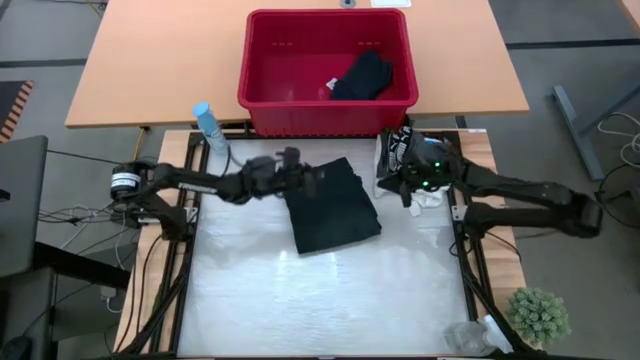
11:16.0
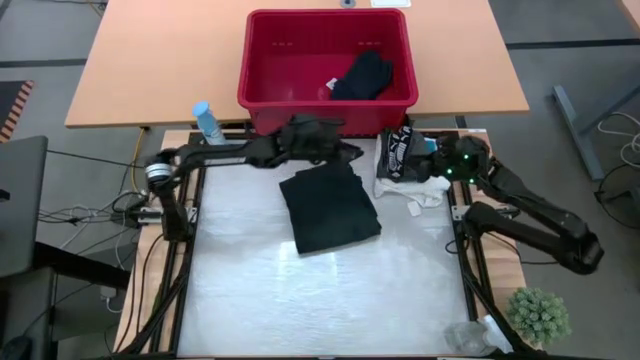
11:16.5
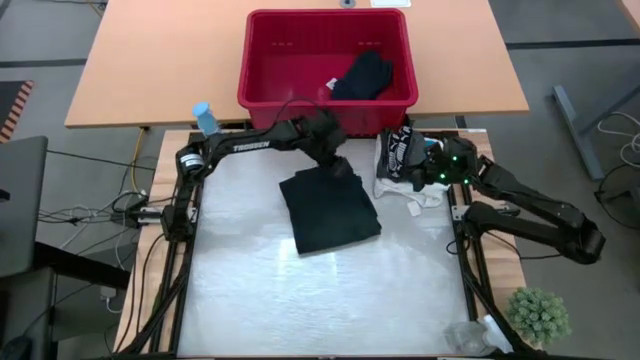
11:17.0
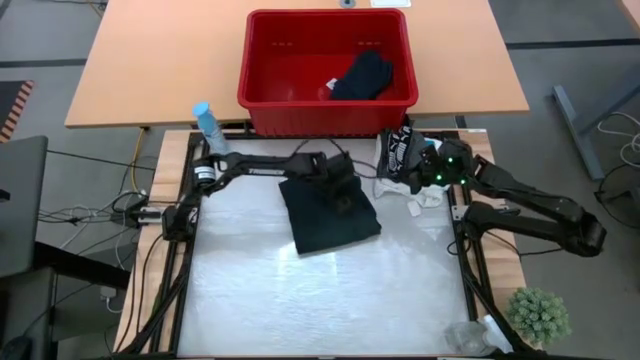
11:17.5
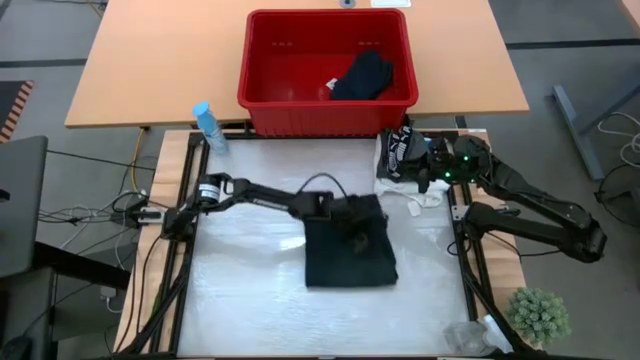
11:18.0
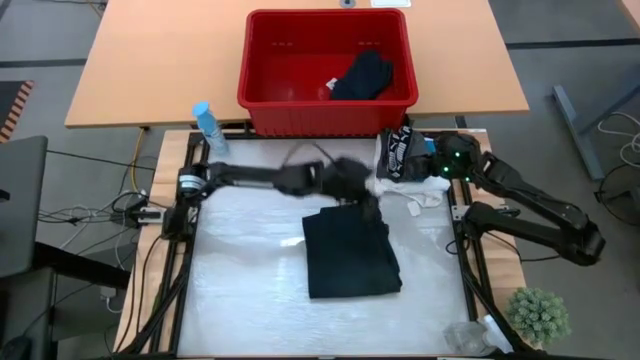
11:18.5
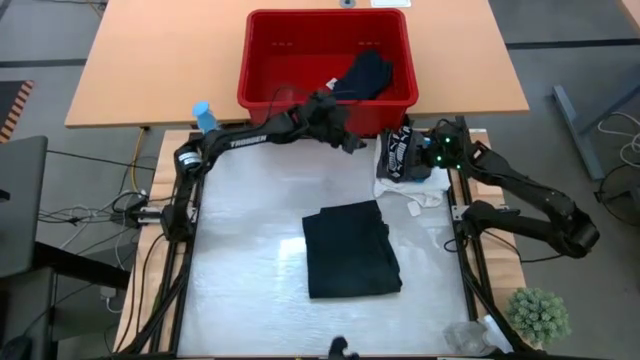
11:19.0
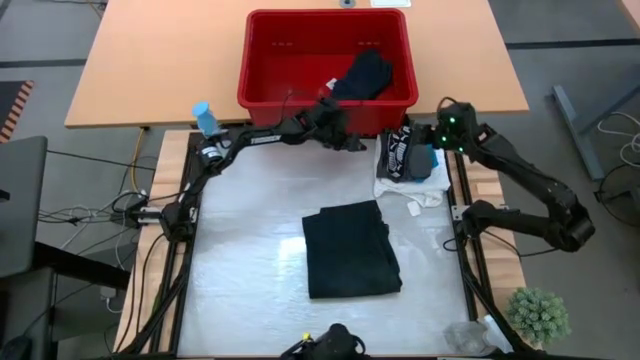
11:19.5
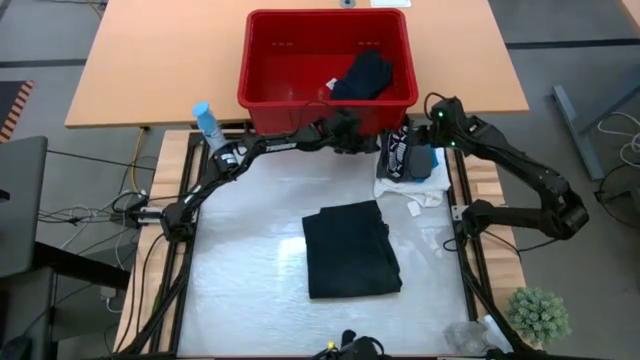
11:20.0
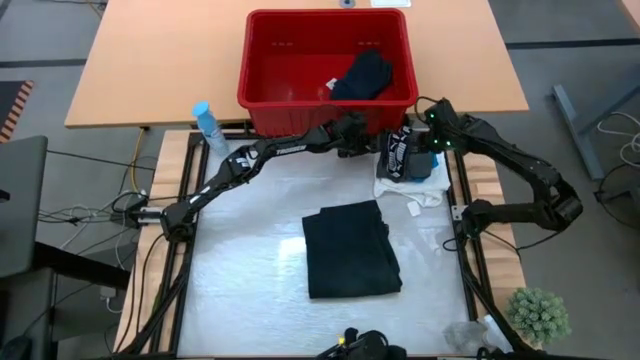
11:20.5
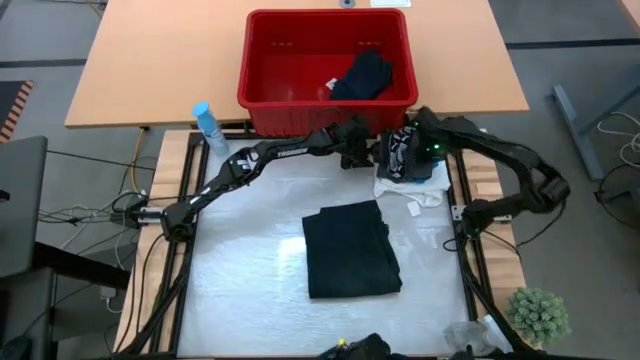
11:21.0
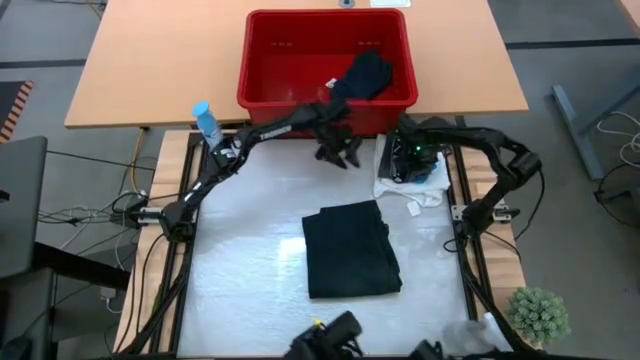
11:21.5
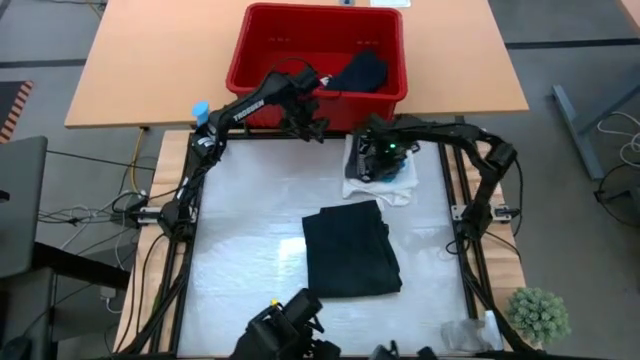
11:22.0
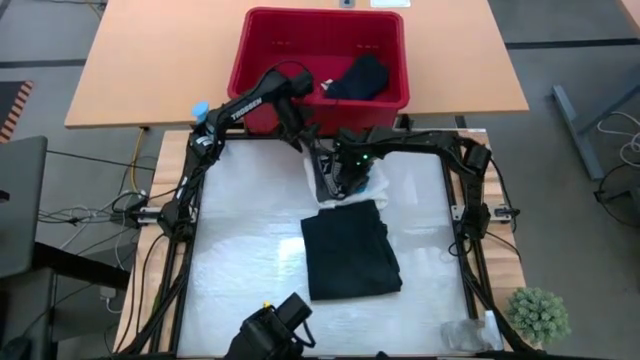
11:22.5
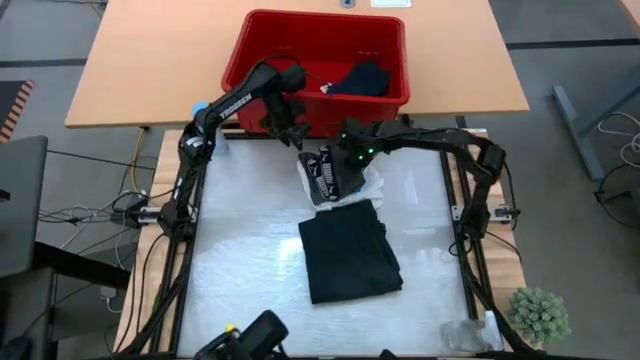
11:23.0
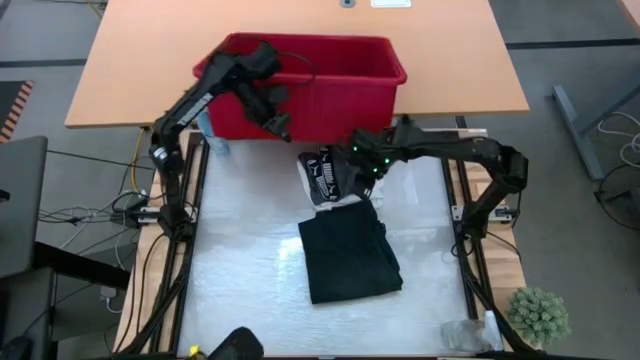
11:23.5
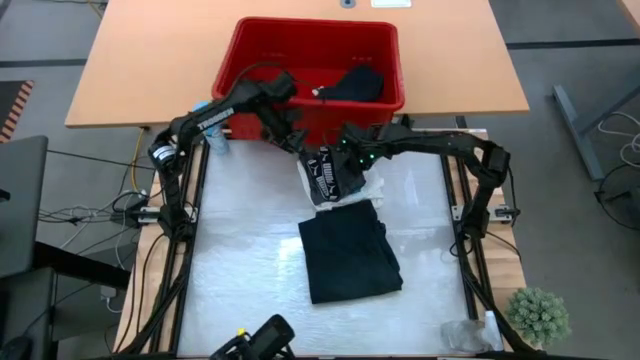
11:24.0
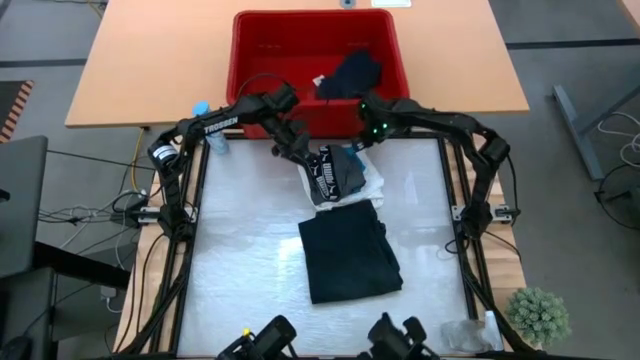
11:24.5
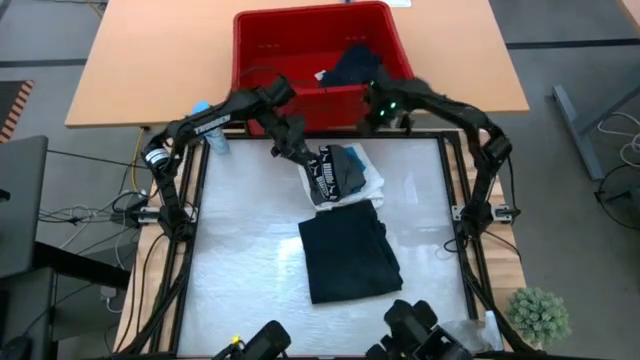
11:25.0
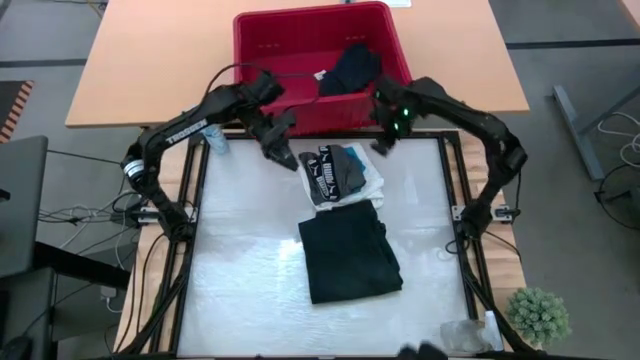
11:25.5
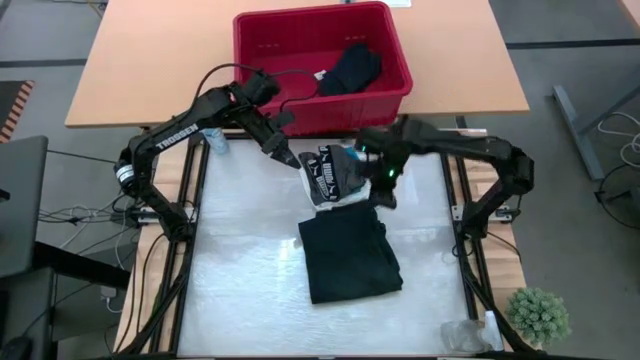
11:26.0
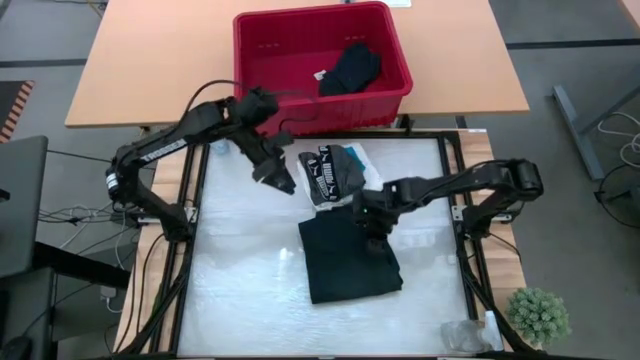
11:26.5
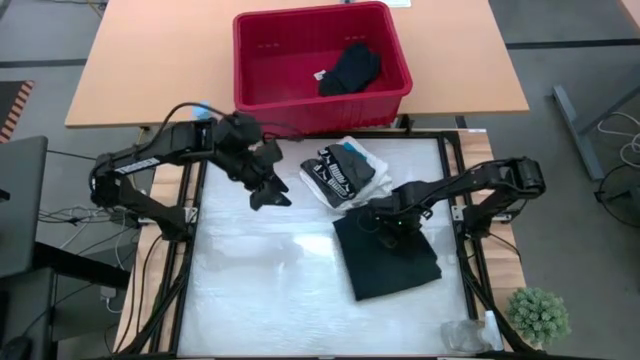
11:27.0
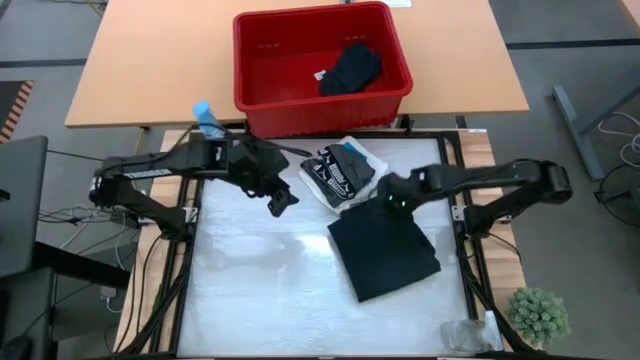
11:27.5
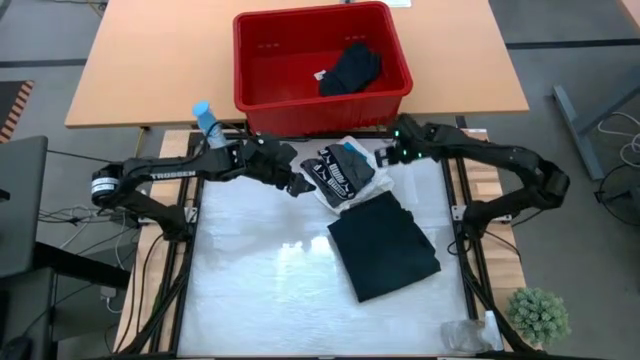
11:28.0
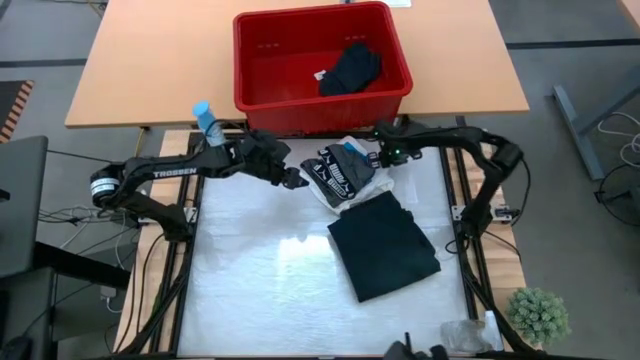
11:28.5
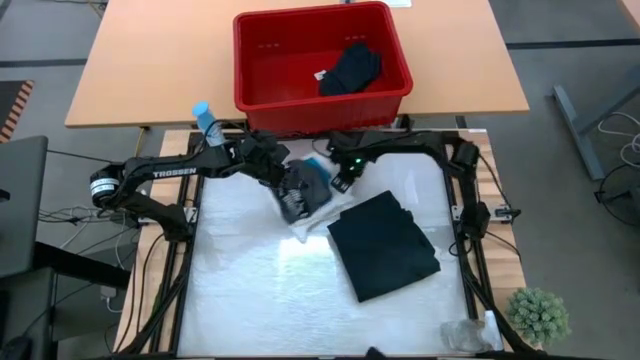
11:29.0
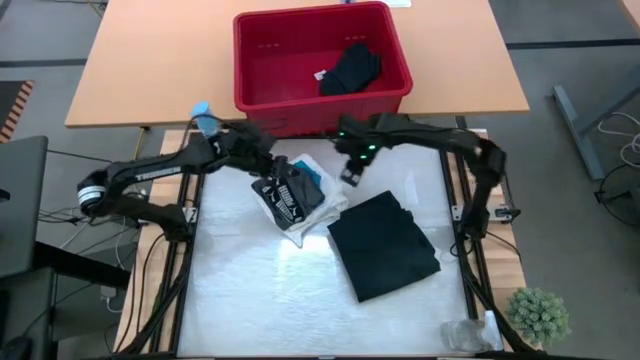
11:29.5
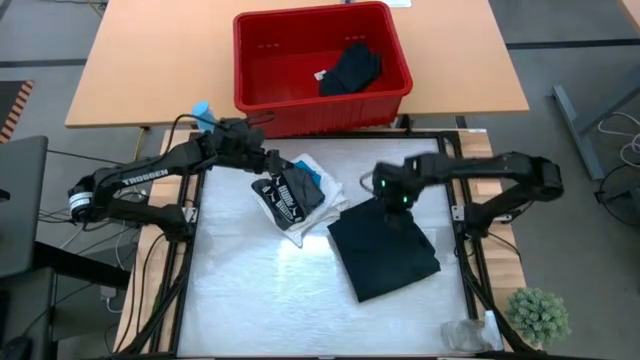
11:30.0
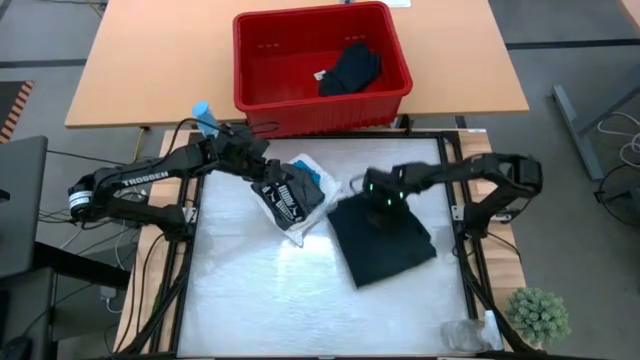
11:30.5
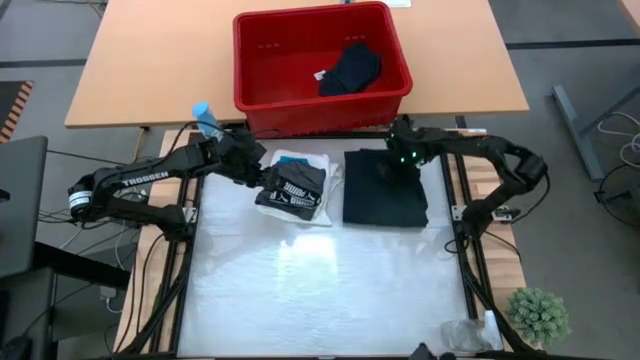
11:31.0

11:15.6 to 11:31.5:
Task: Fold laundry
Stack the clothes on the blue pants

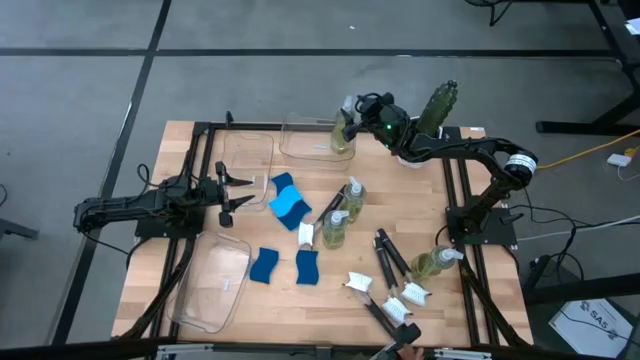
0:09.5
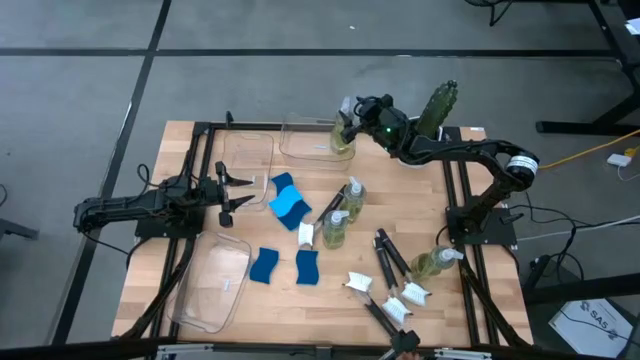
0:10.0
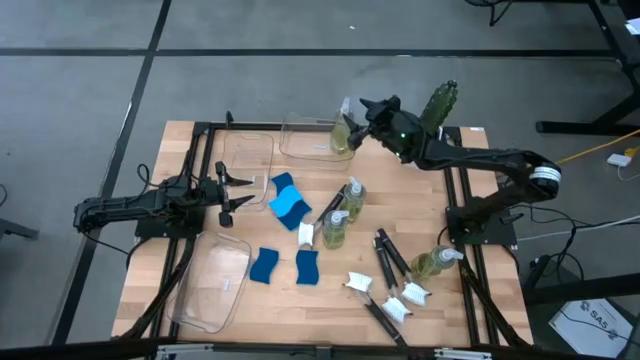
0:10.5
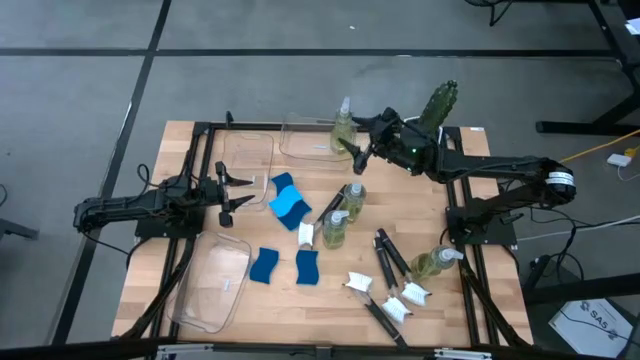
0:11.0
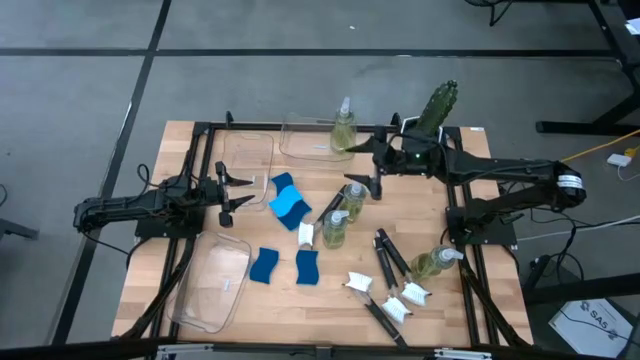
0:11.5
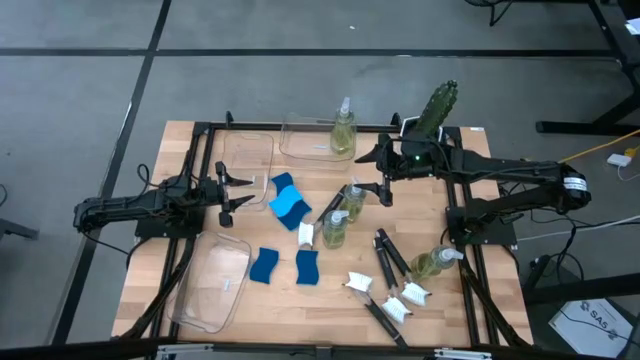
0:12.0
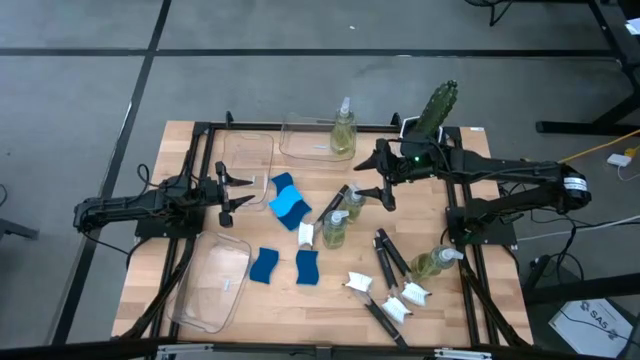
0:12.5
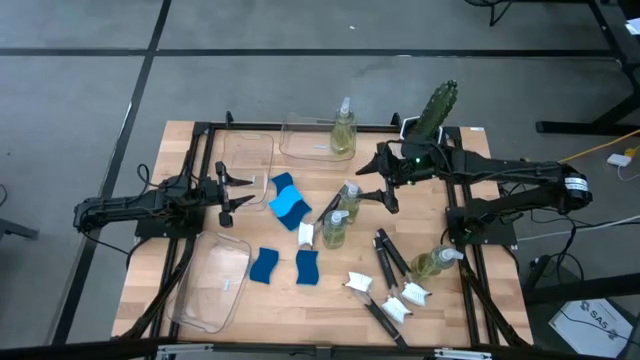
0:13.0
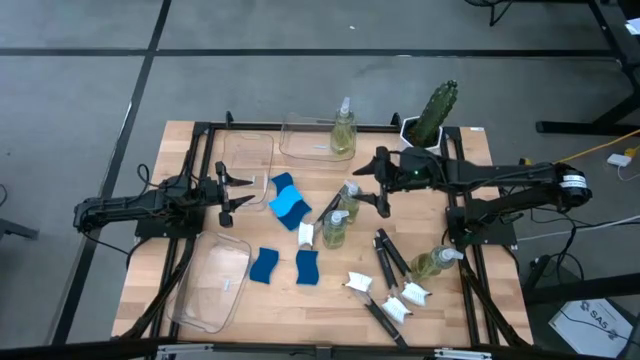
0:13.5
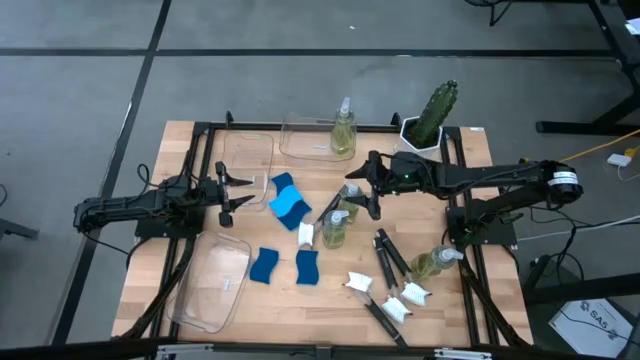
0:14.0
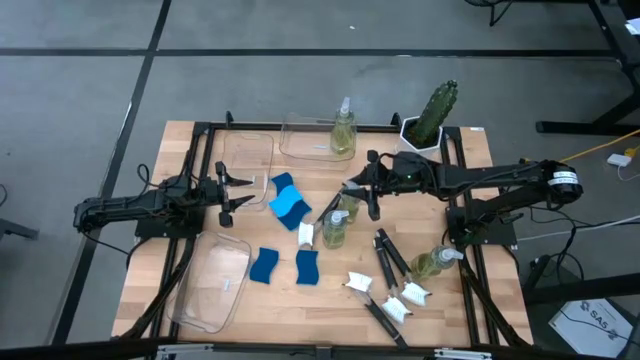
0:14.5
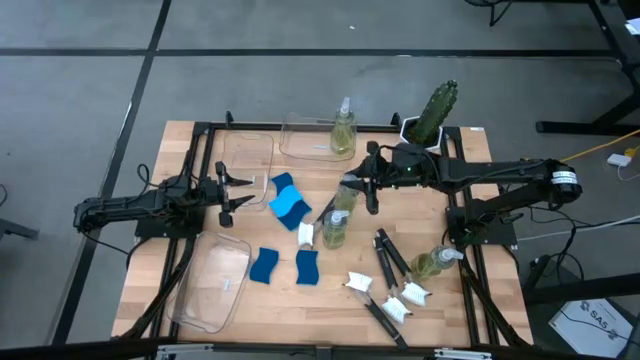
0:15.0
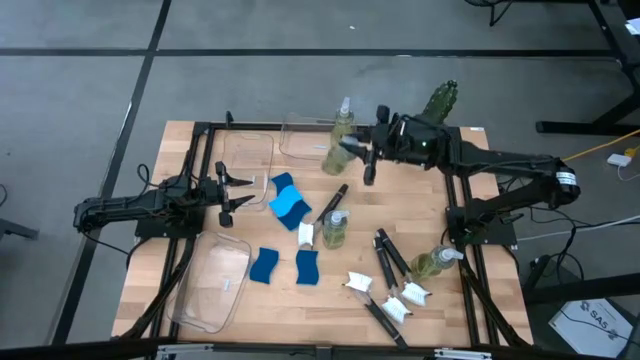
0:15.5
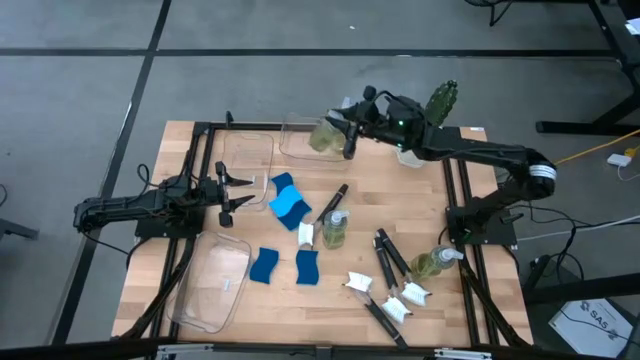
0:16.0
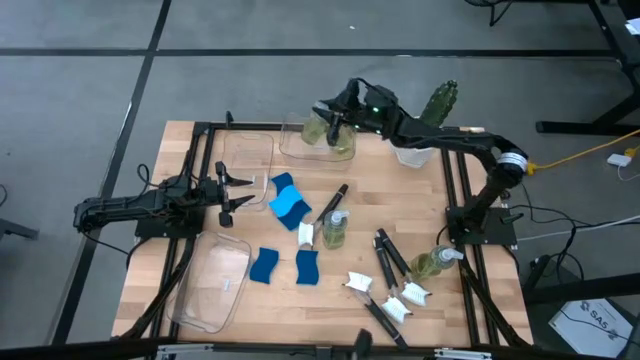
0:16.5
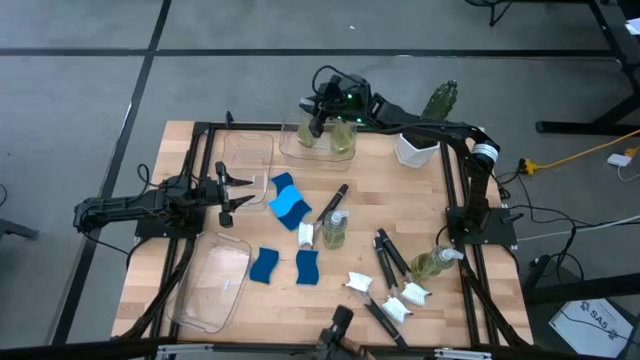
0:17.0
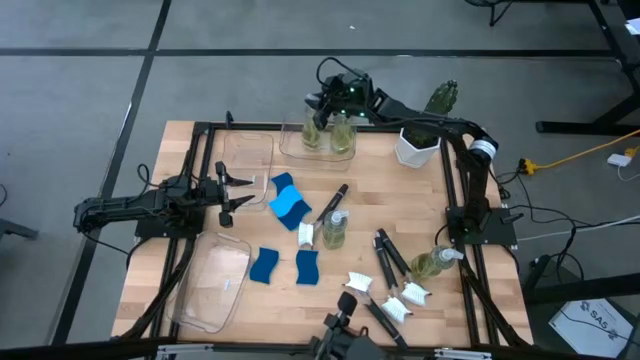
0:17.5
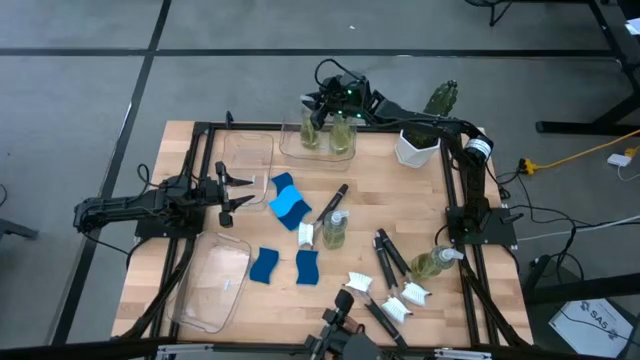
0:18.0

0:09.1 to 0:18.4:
Task: Pick & Place Kitchen Sink Supplies
Put the yellow soap dispenser bottle into the top right transparent bin
